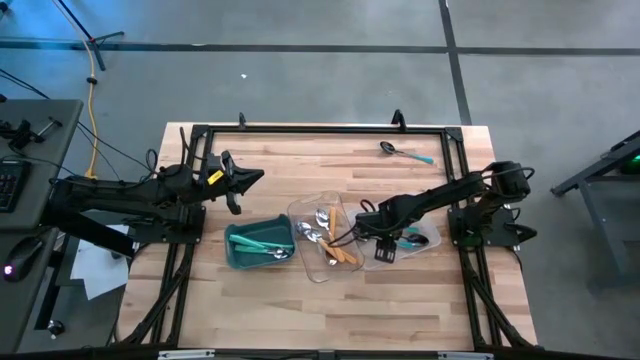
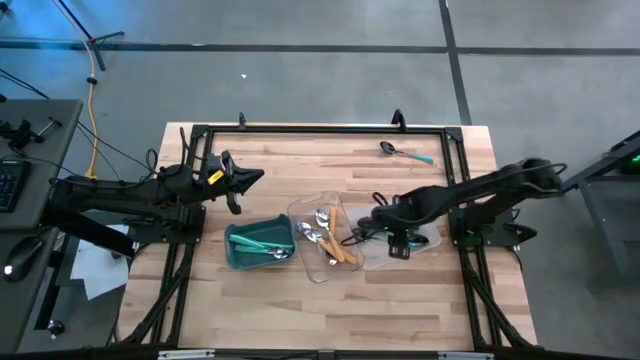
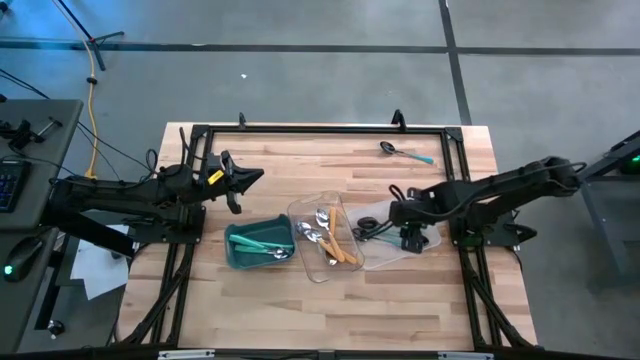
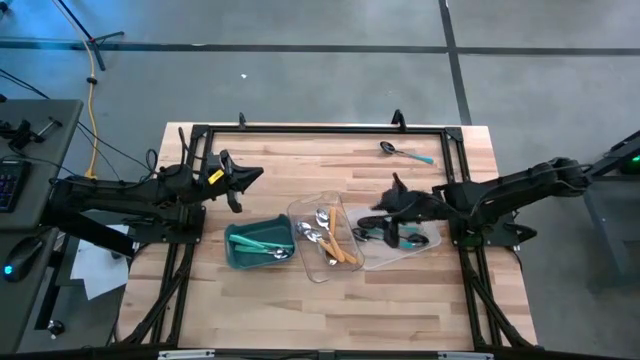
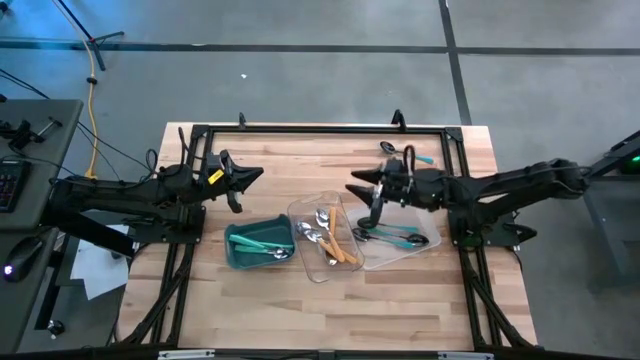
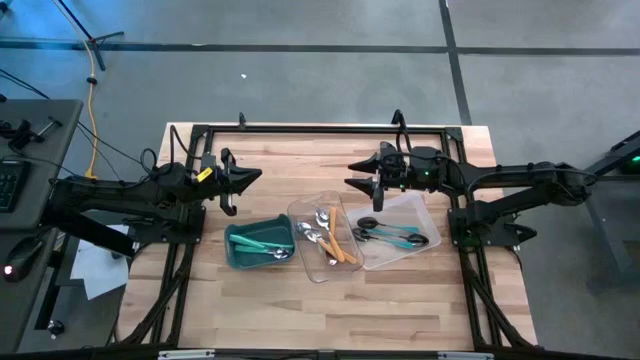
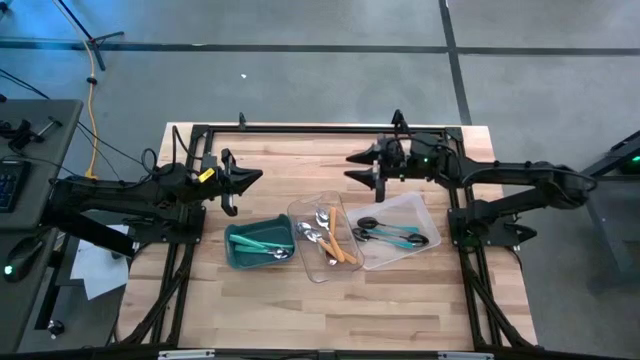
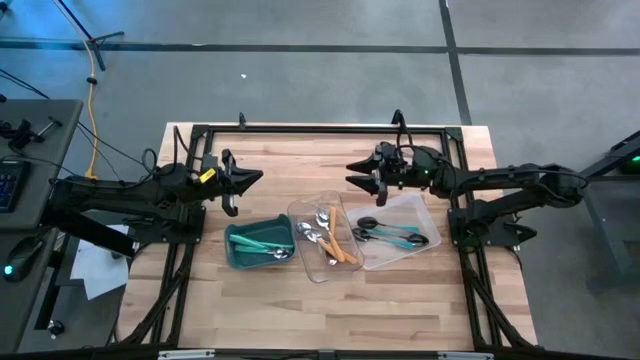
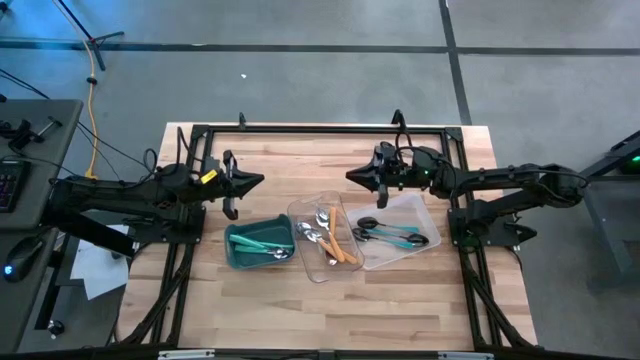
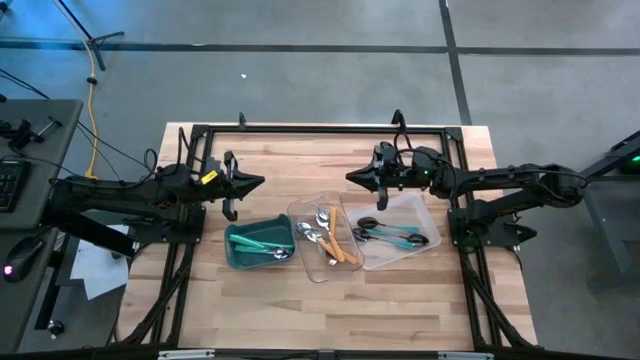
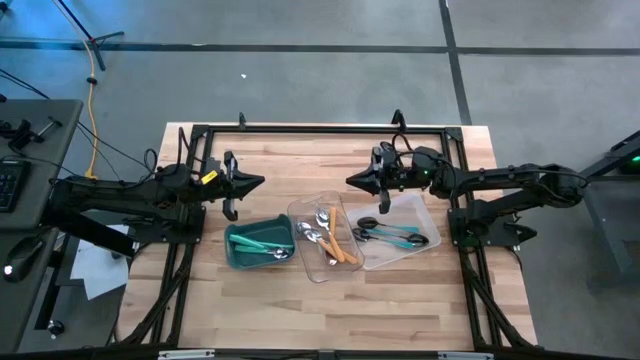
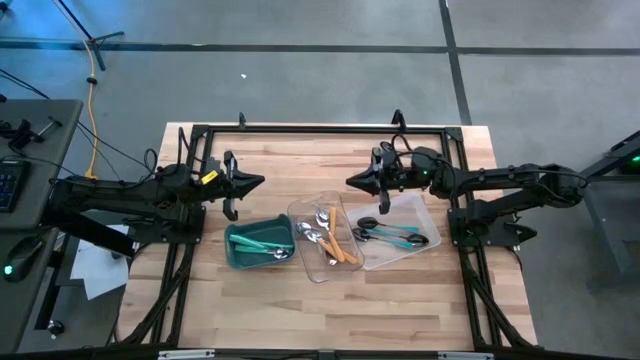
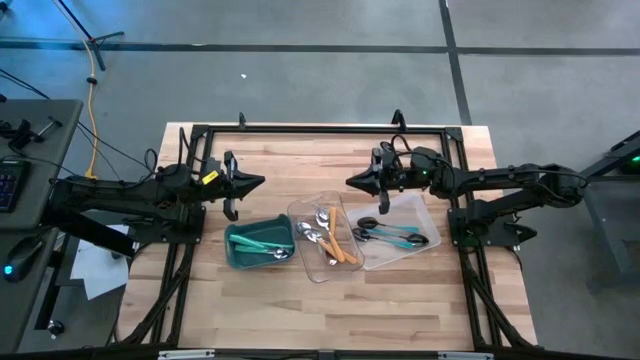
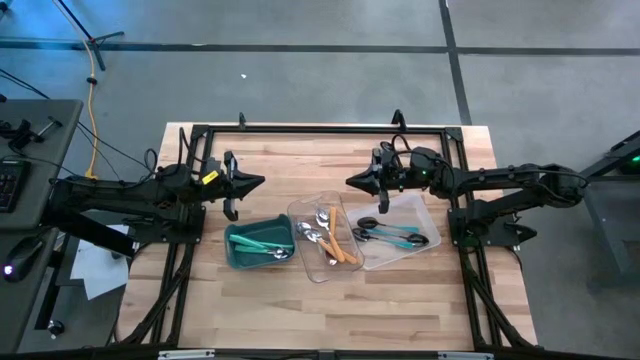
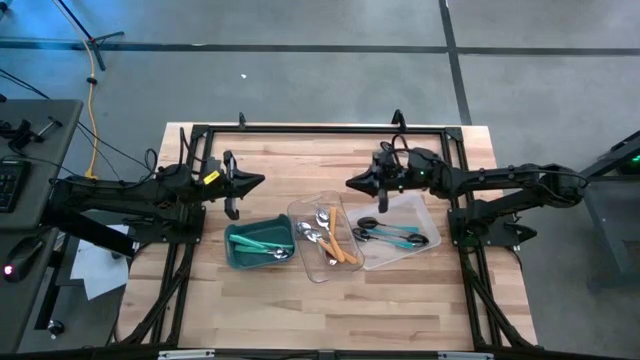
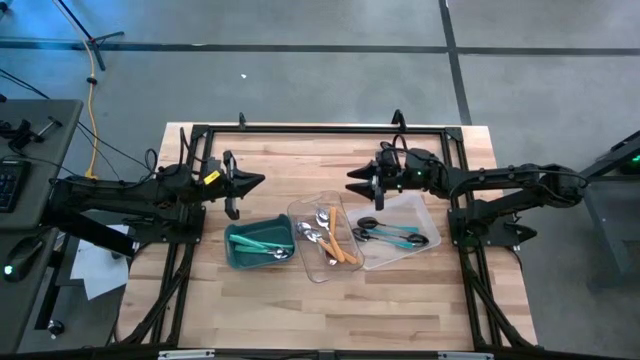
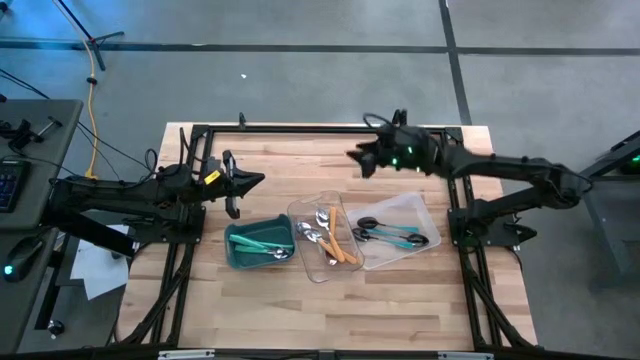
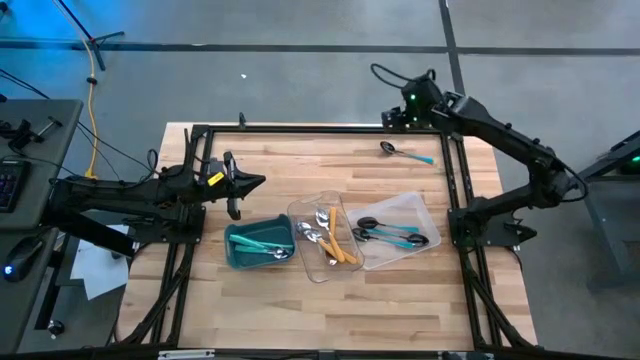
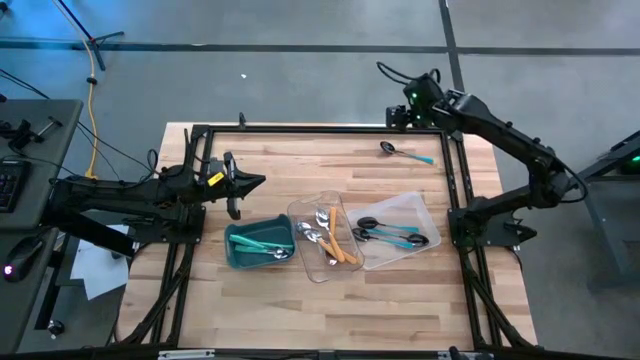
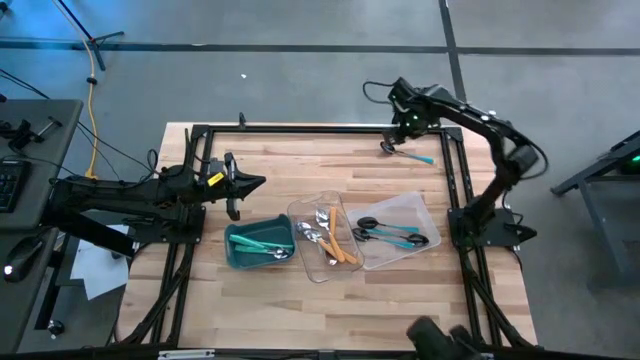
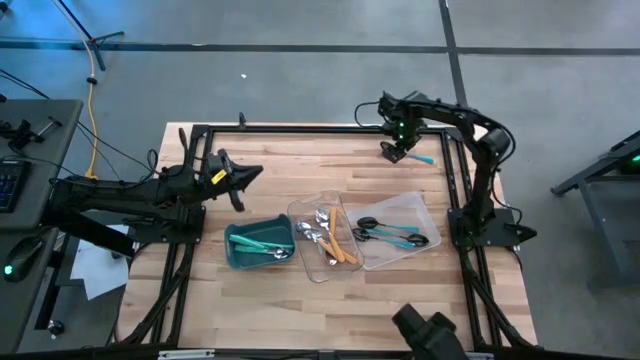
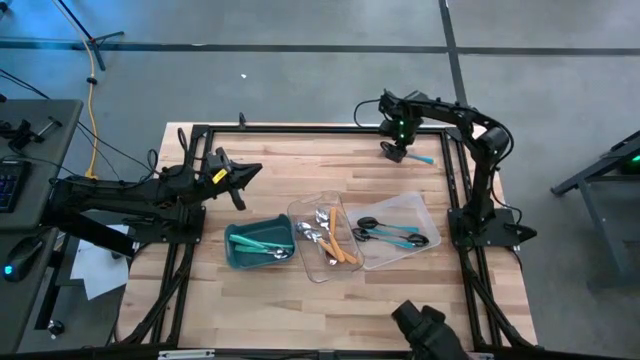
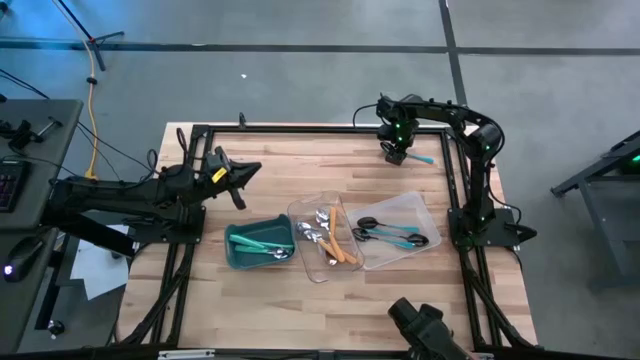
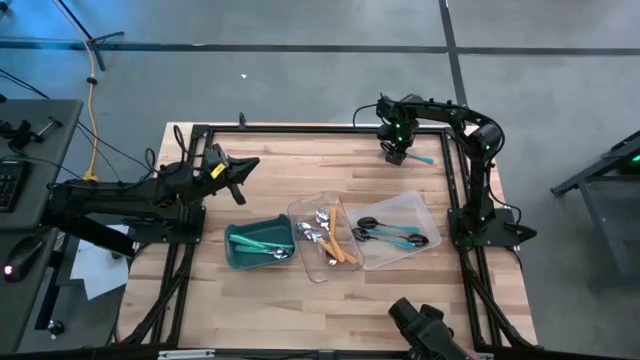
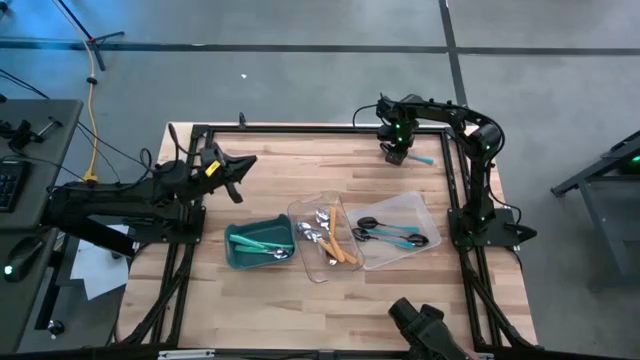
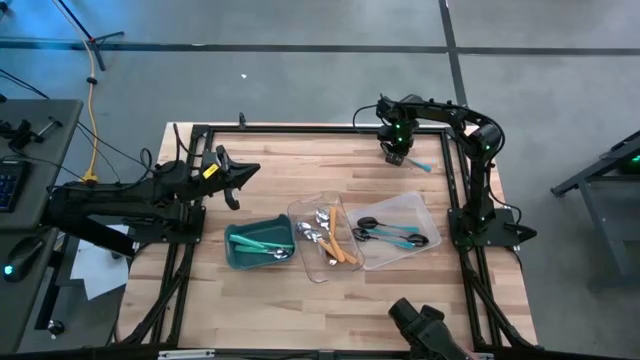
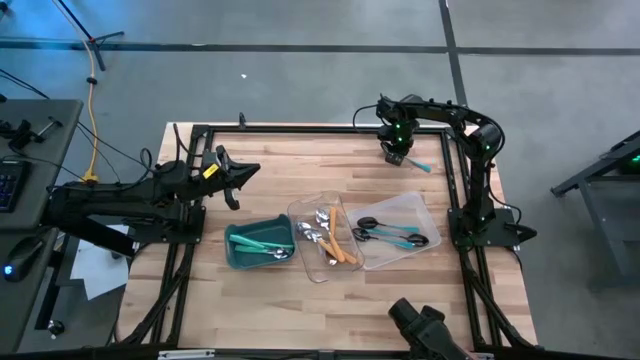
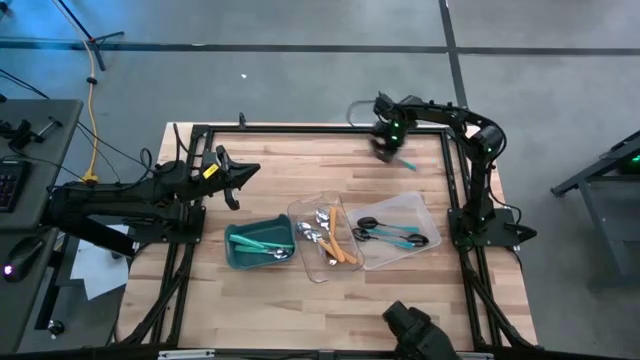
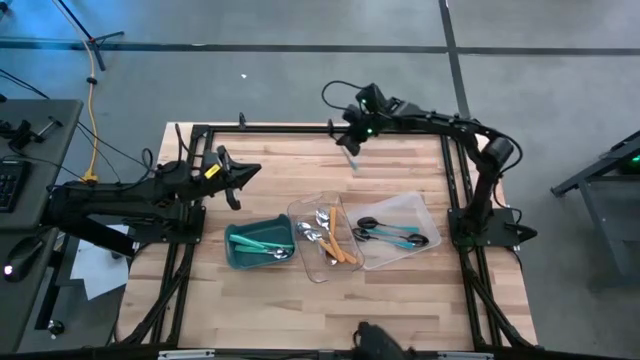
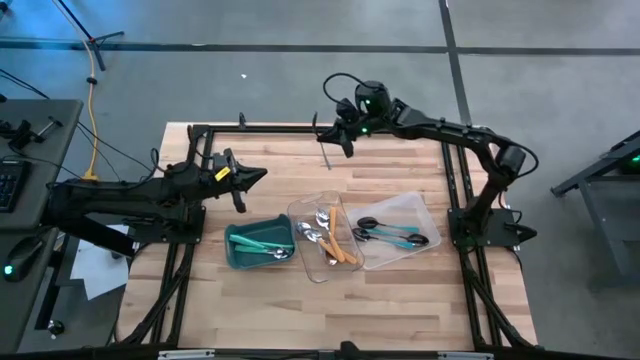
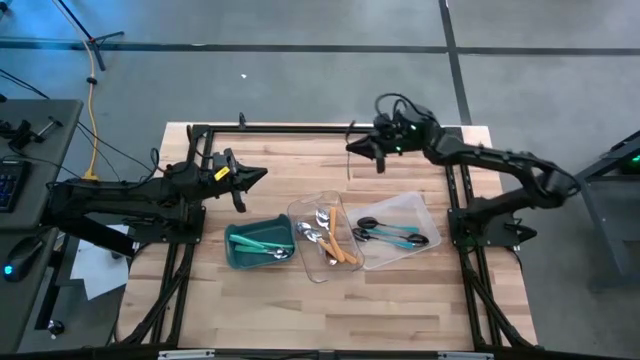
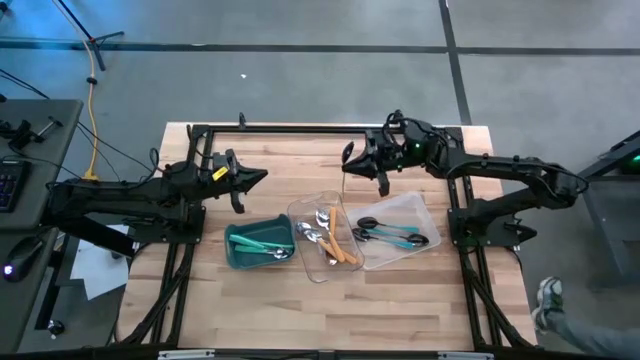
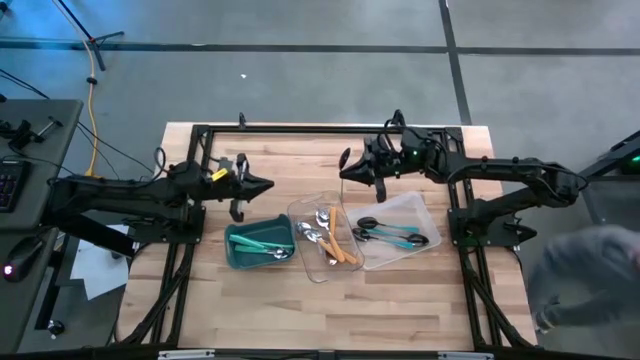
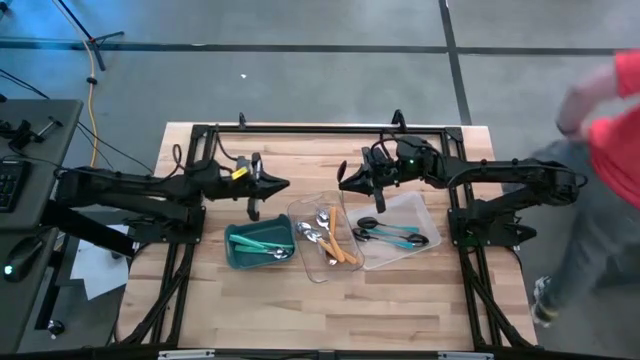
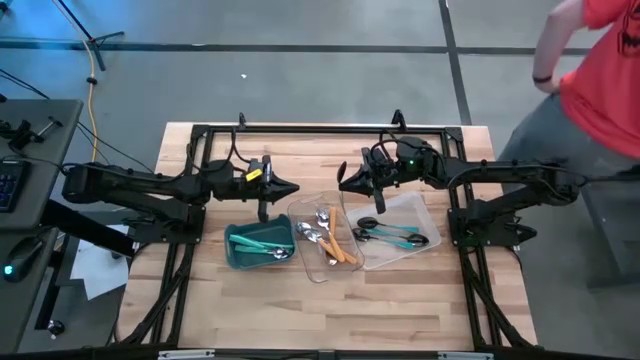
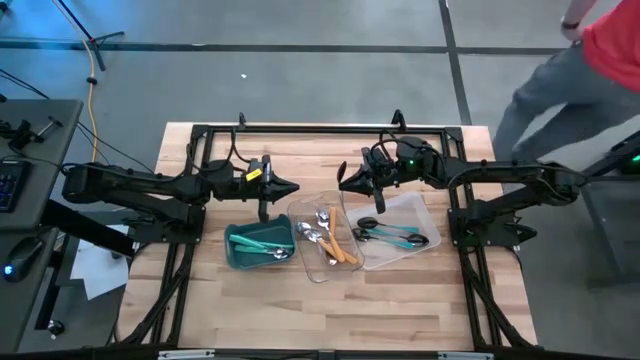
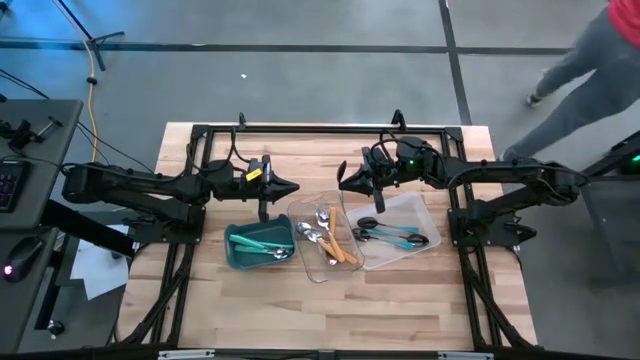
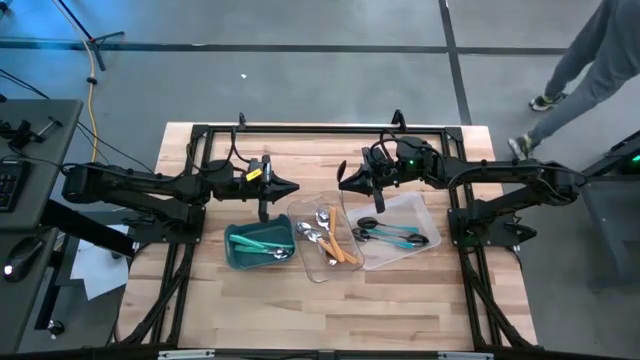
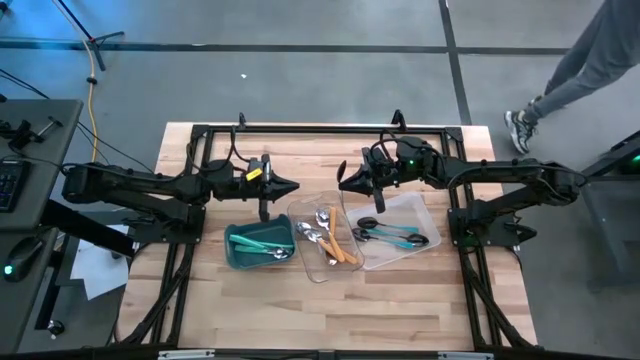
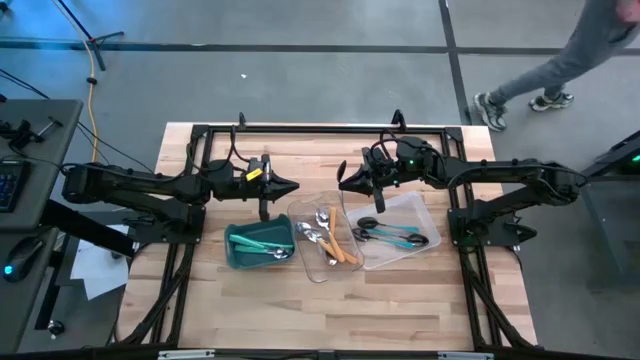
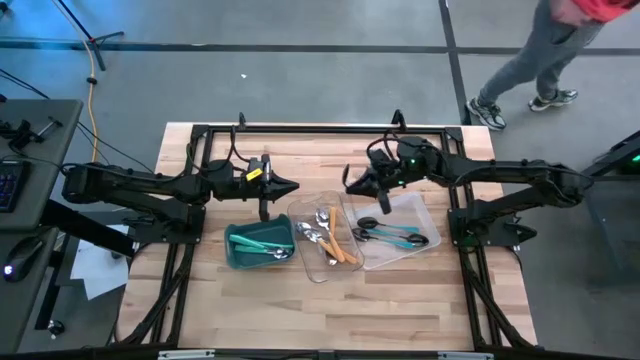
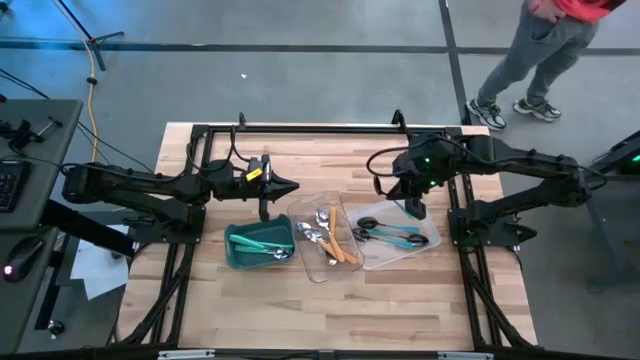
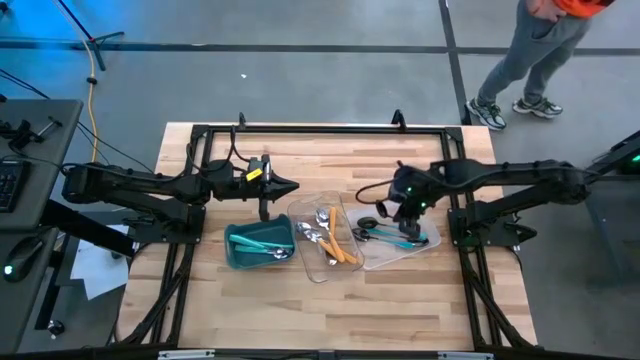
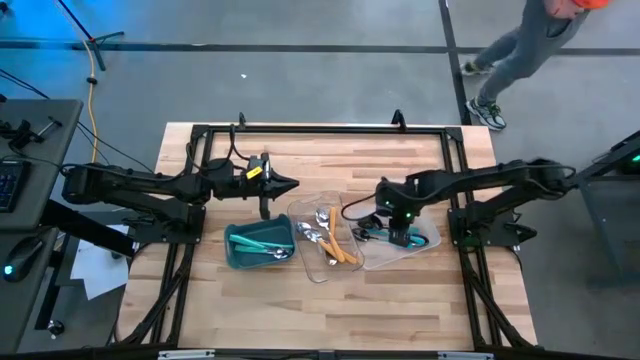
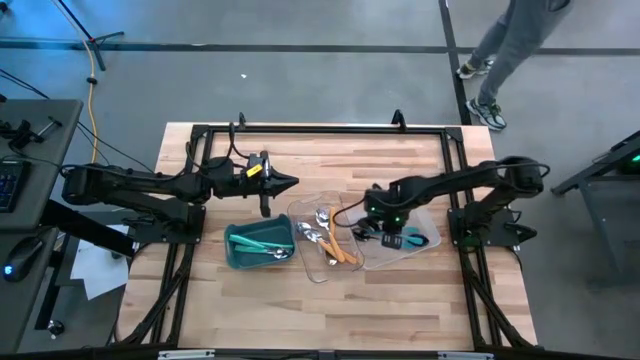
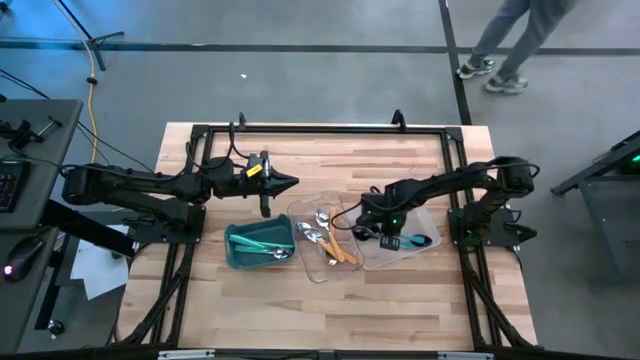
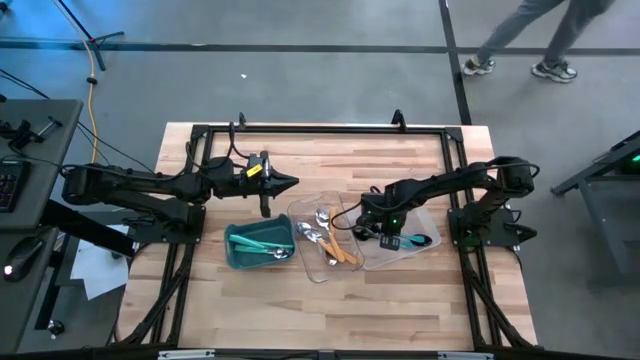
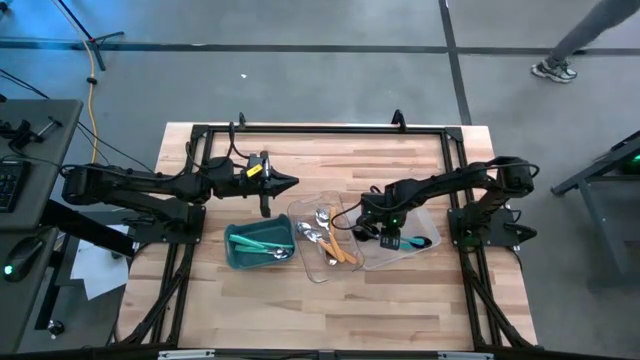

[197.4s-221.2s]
Task: Sort silverware by color (type)
Put the blue spoon into the white bin
